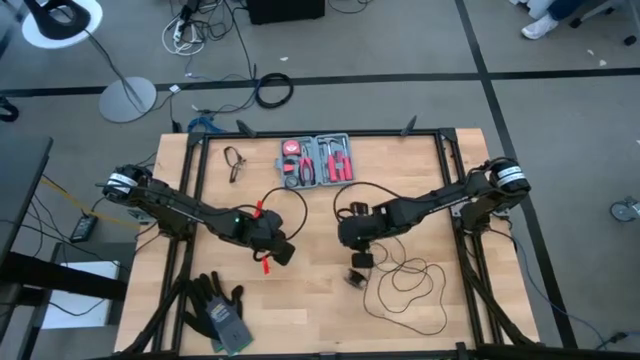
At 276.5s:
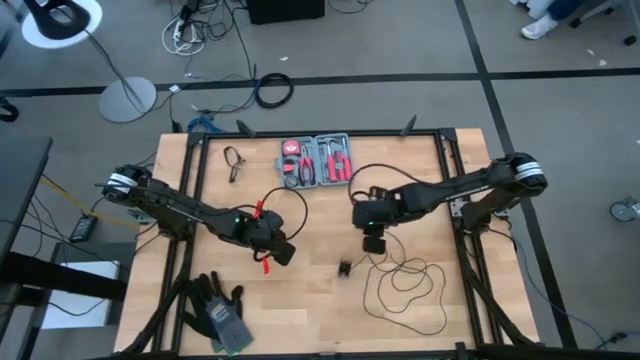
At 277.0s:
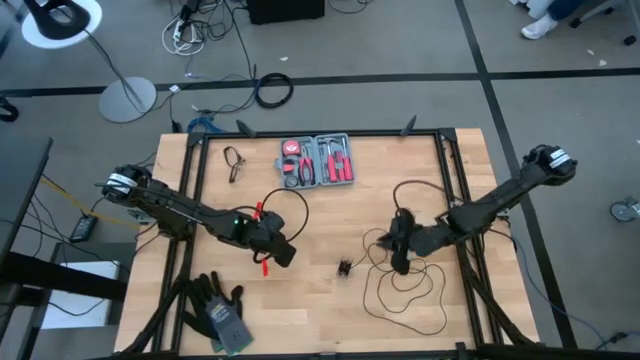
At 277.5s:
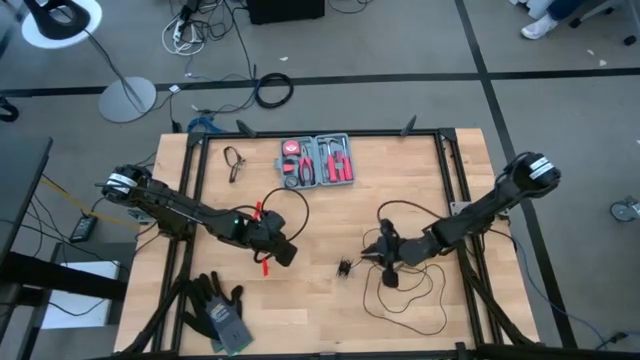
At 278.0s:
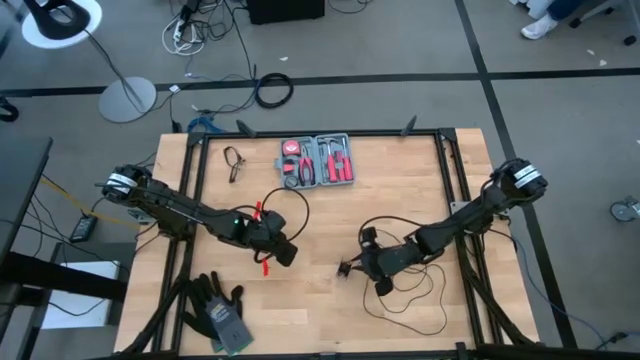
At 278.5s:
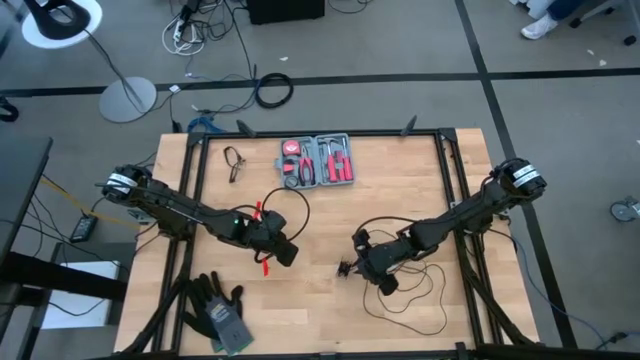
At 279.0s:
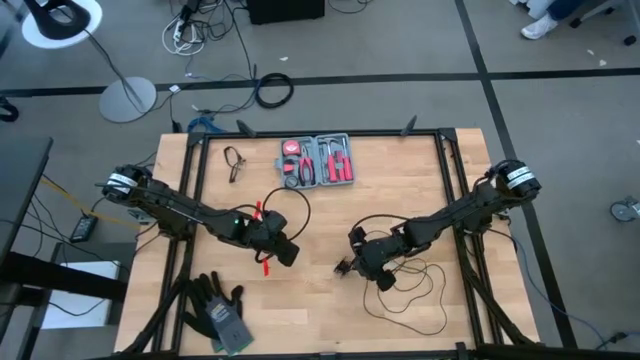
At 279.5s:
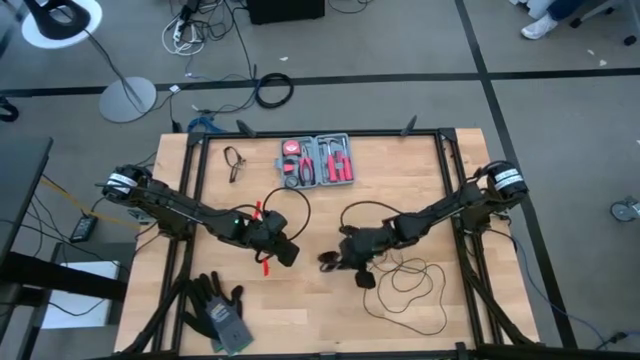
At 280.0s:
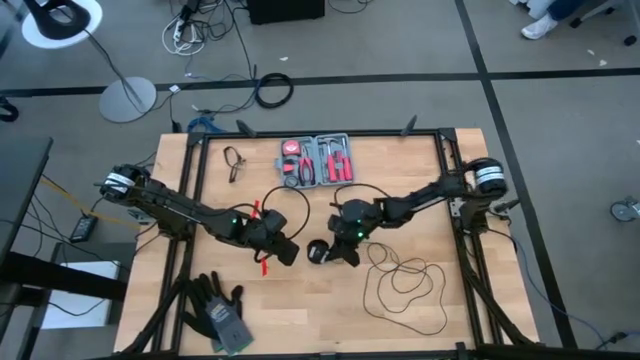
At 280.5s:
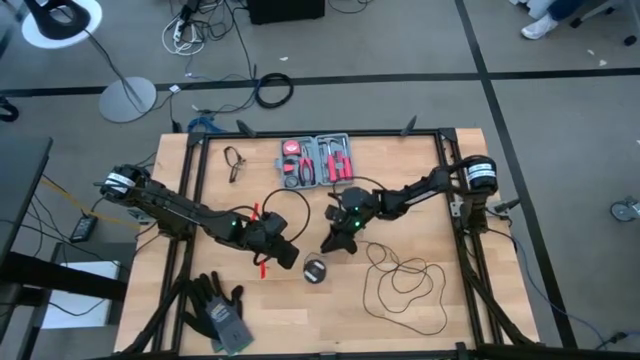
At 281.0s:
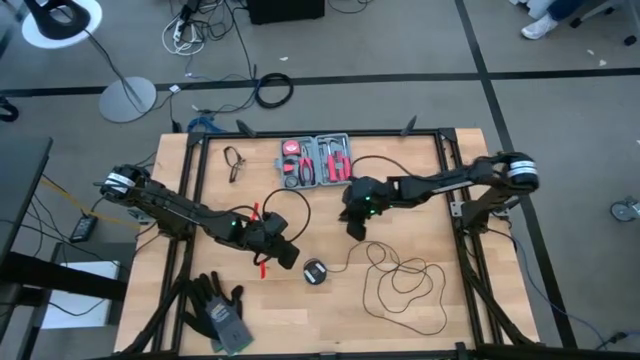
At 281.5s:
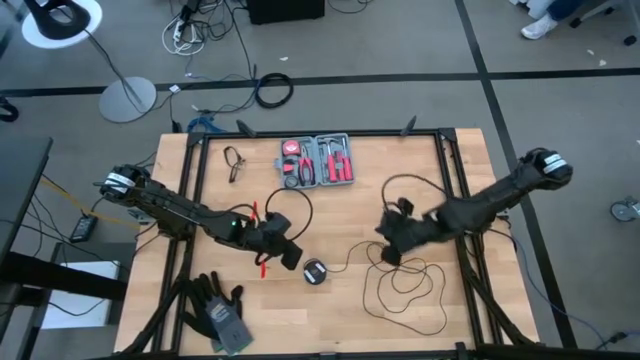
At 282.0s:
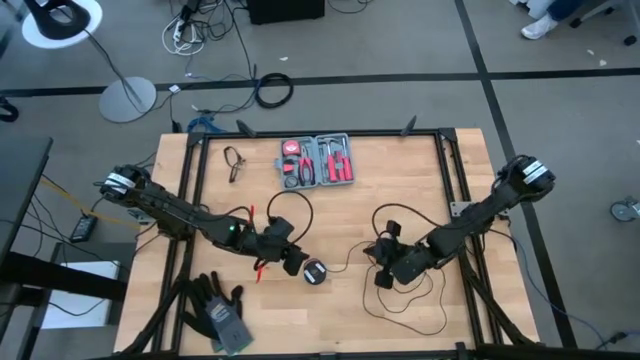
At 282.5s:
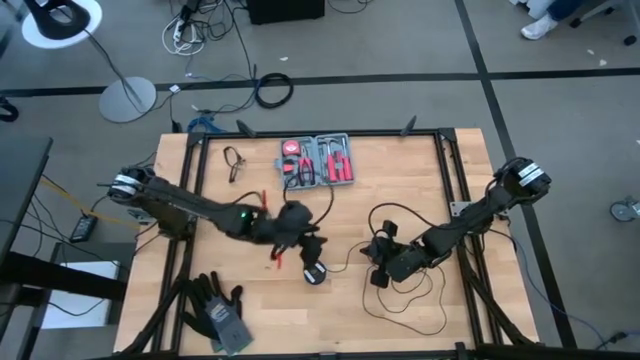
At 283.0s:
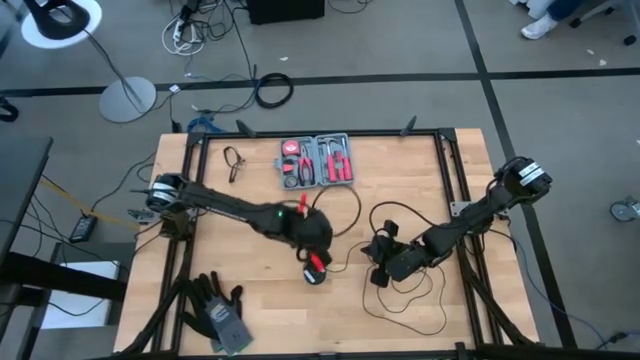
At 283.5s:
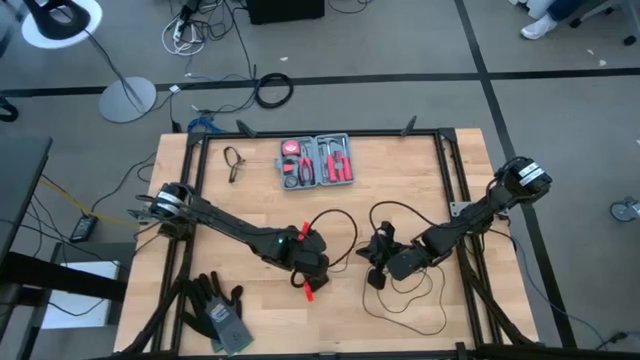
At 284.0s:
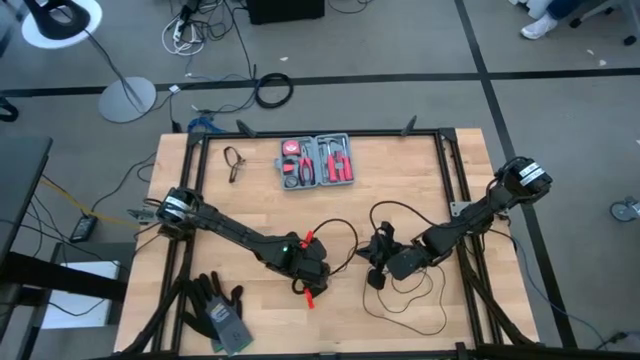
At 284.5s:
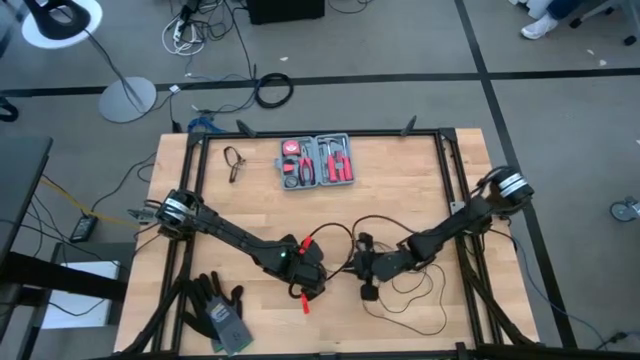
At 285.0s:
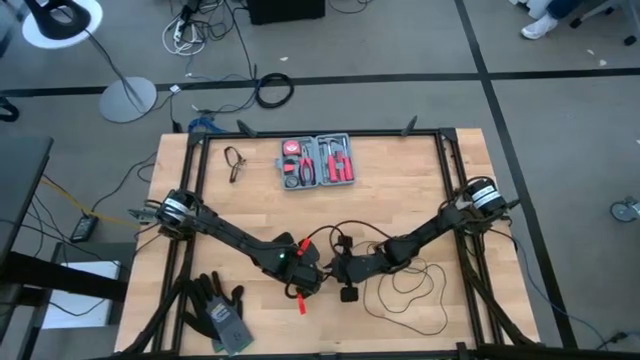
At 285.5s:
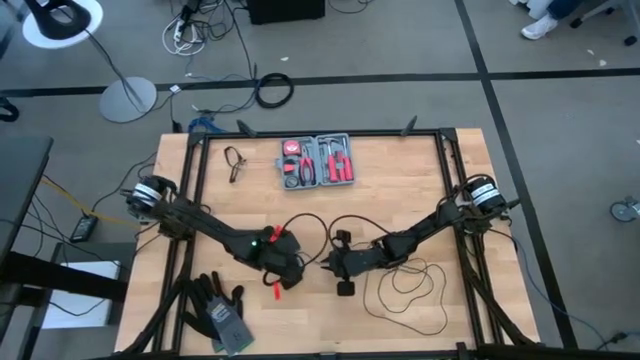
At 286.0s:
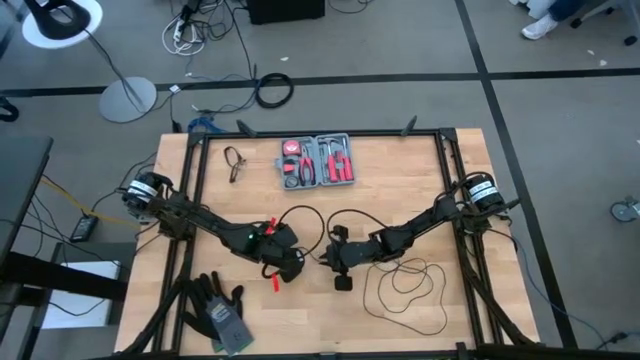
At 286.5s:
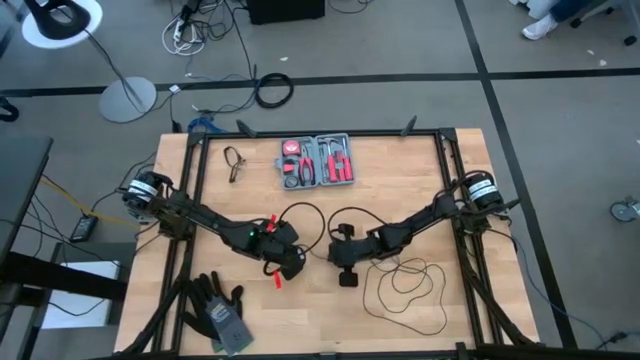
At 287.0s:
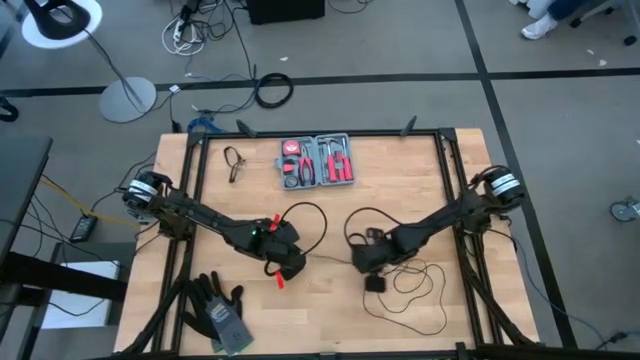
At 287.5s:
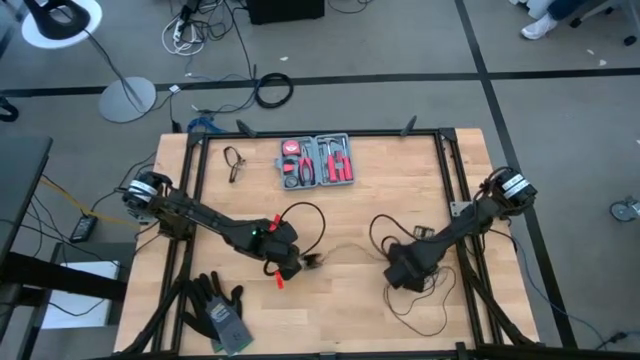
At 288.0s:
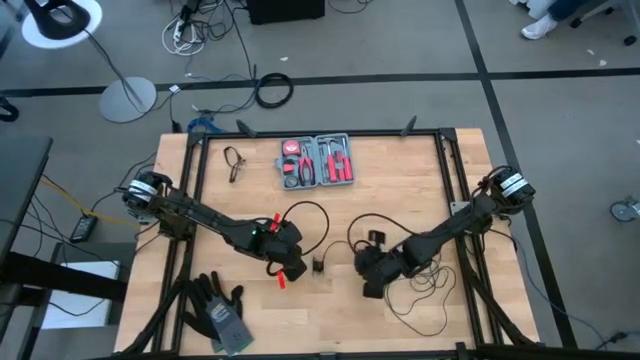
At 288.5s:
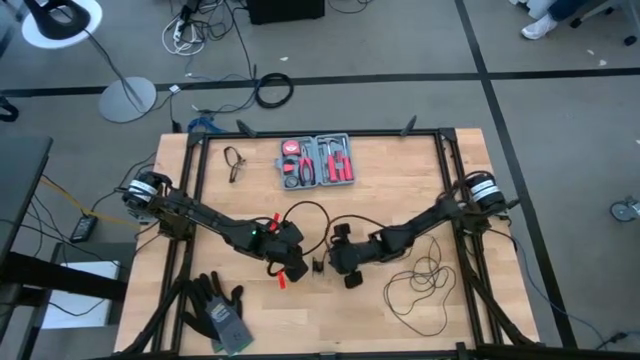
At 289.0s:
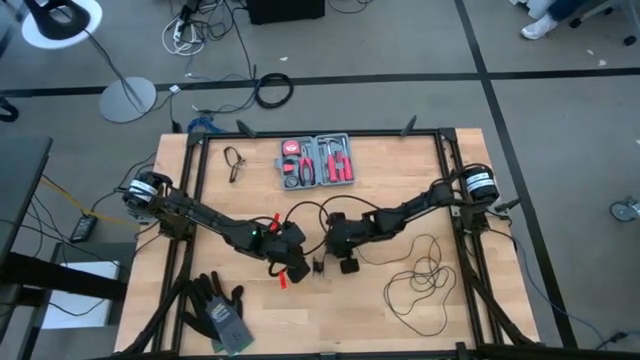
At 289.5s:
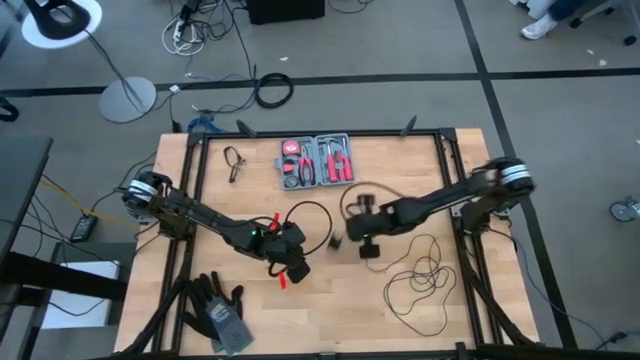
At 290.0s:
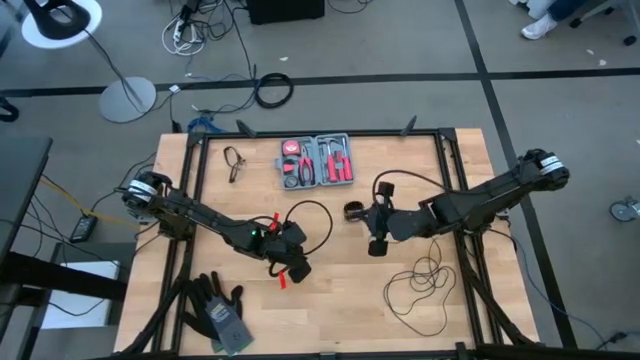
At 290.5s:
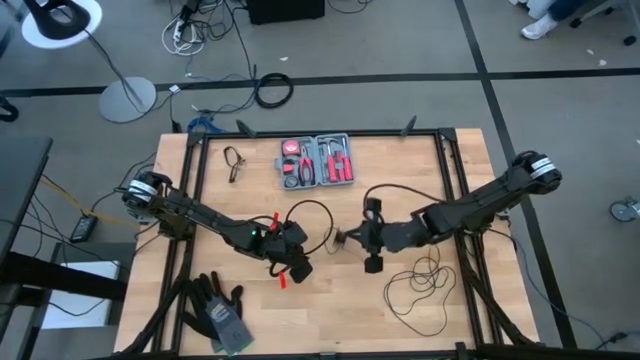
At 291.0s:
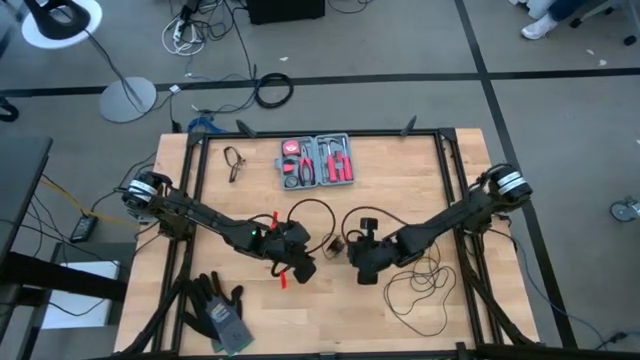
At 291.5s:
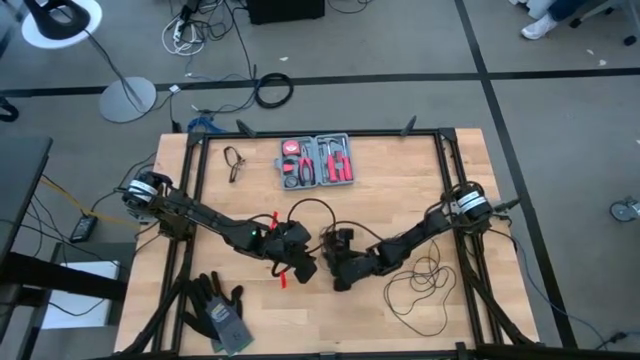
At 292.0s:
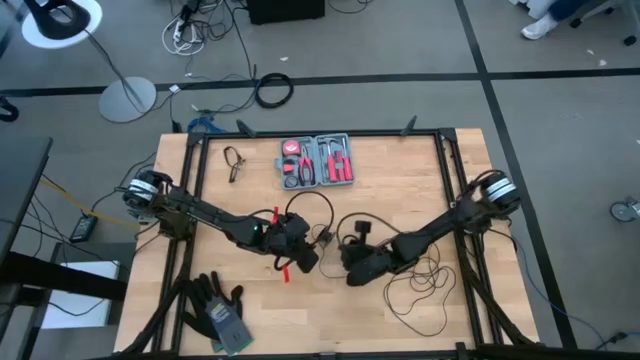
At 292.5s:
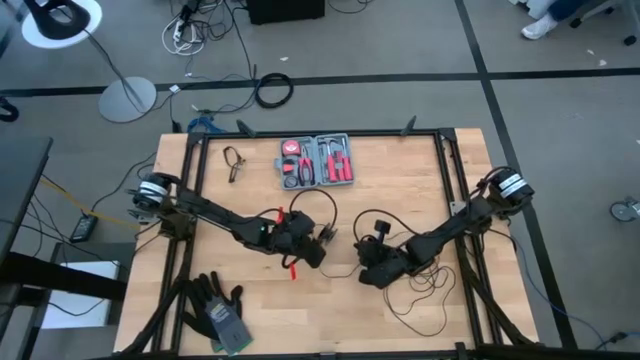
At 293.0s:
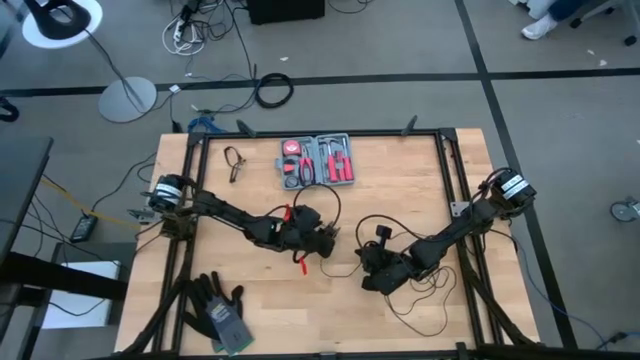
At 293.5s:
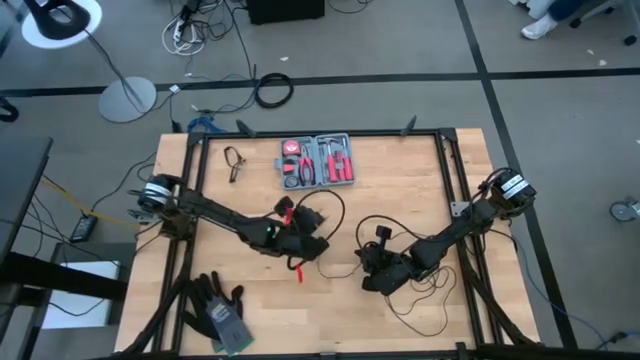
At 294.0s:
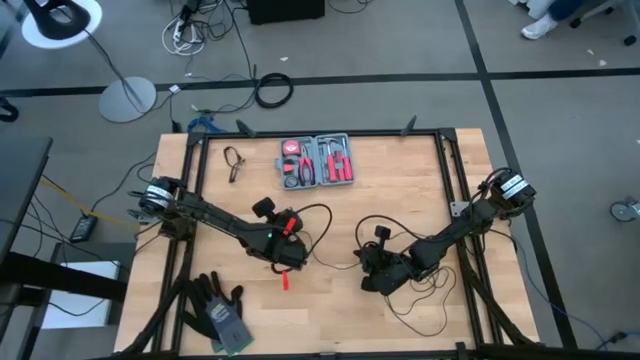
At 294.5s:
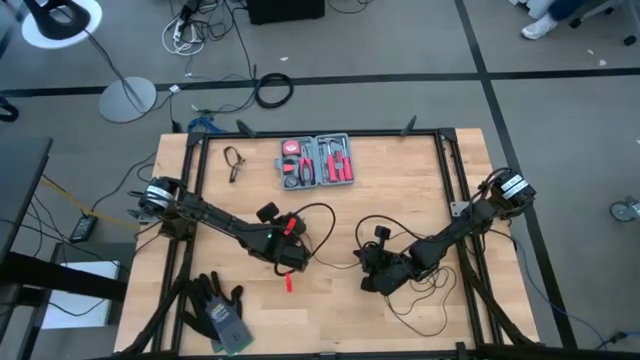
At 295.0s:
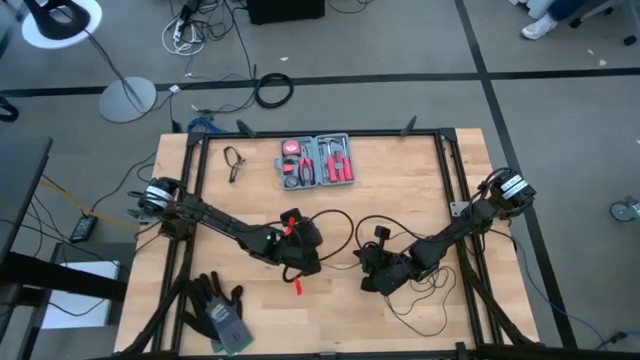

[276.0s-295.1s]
Task: Coil cords
Uncoil the black wire from the black spool

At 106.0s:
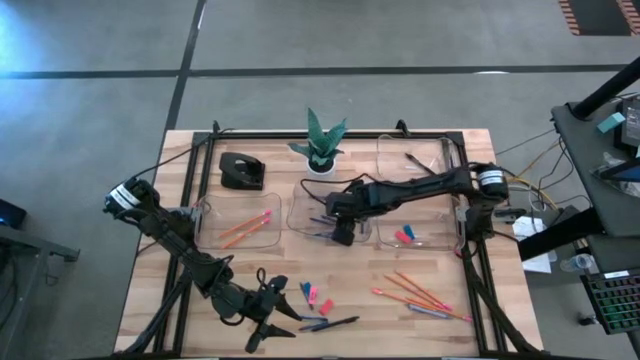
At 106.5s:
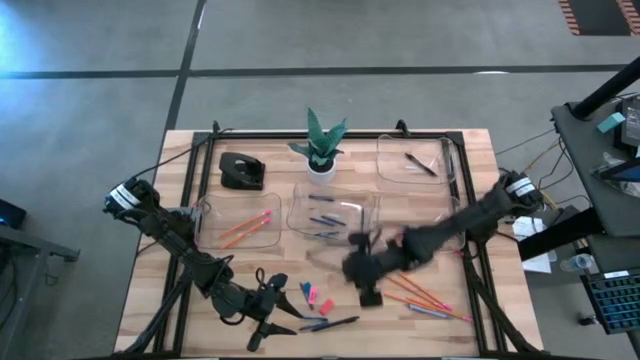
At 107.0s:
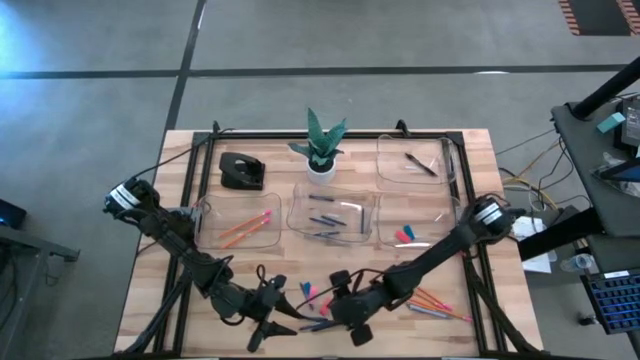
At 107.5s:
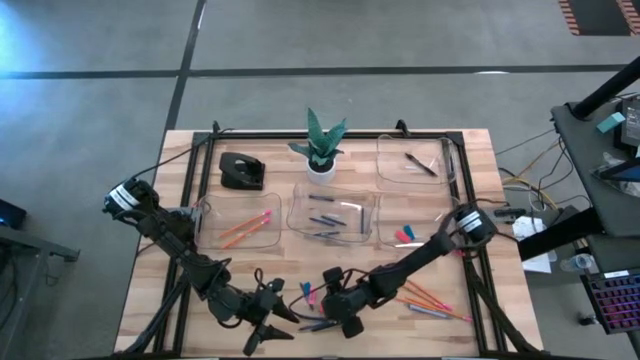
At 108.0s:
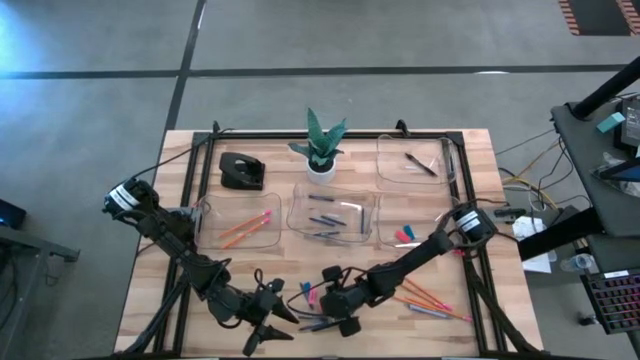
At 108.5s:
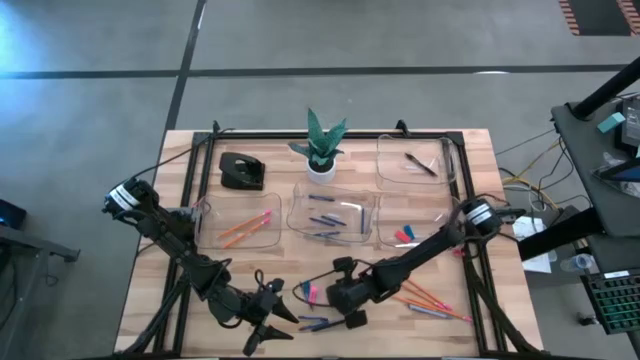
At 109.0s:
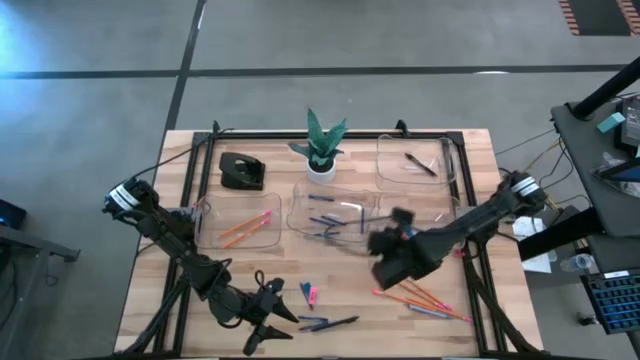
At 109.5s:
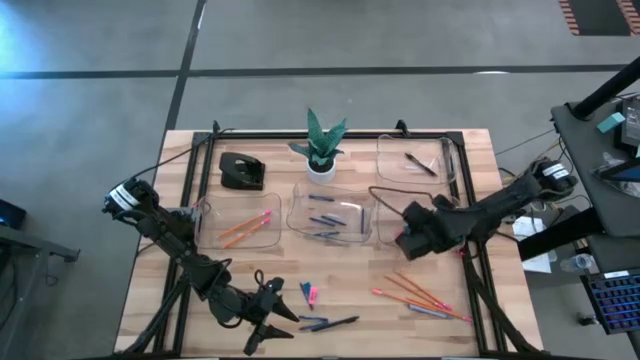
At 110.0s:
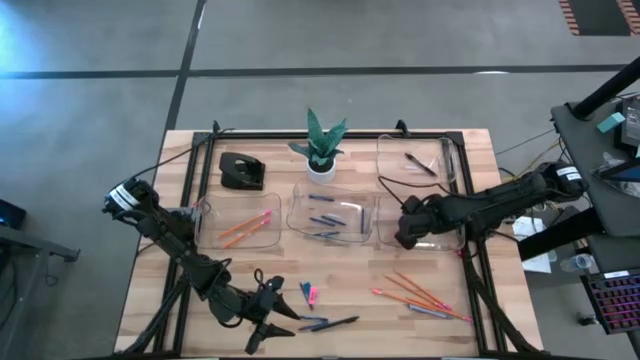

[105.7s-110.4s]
Task: Sort crayons/erasers/pens/pencils in bins
Put the orange eraser into the middle right transparent bin
